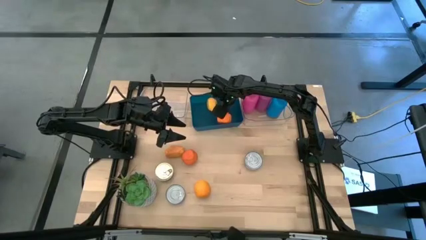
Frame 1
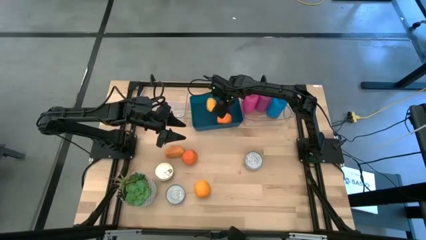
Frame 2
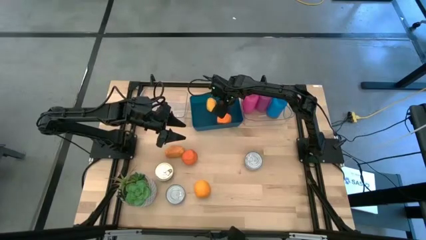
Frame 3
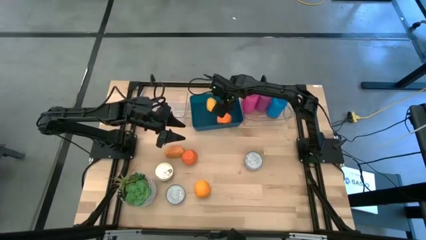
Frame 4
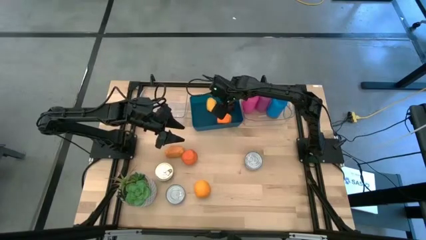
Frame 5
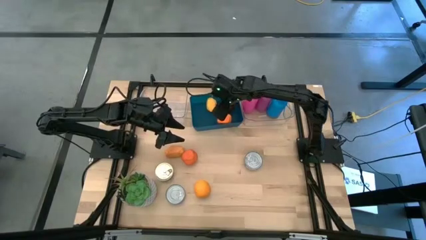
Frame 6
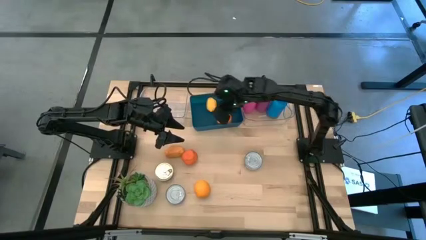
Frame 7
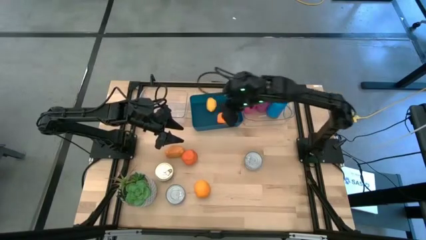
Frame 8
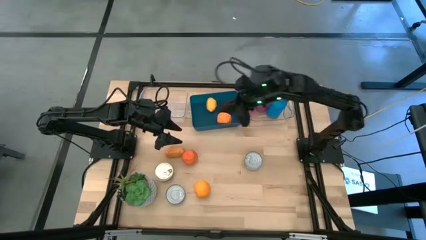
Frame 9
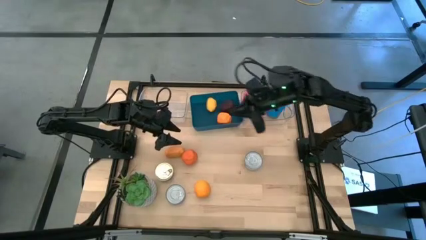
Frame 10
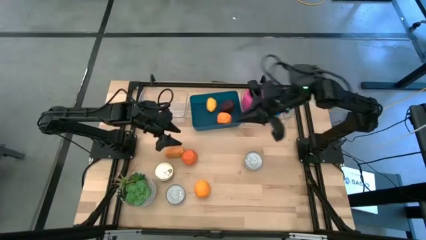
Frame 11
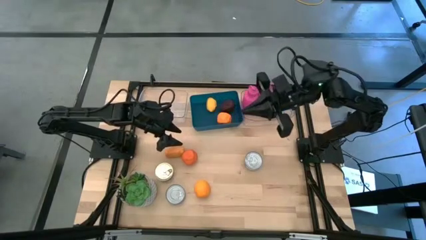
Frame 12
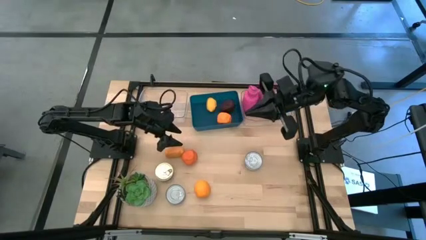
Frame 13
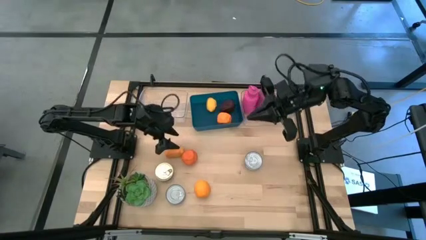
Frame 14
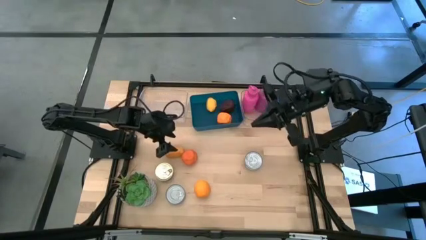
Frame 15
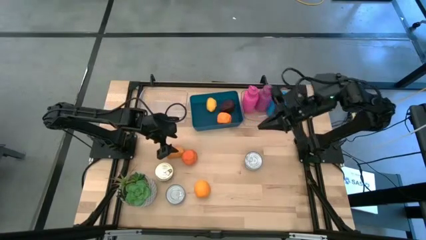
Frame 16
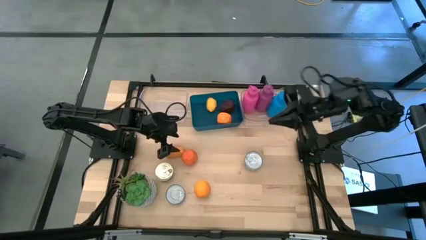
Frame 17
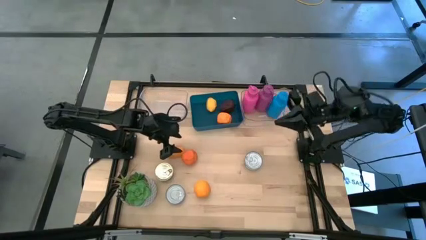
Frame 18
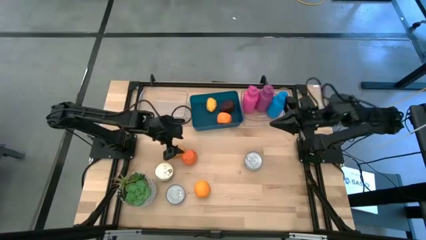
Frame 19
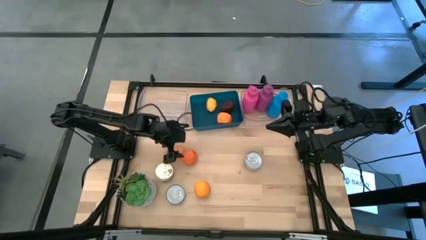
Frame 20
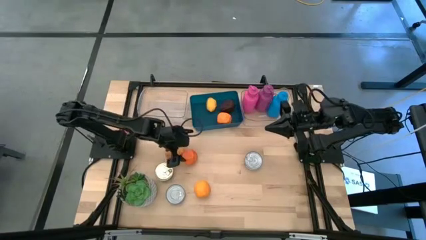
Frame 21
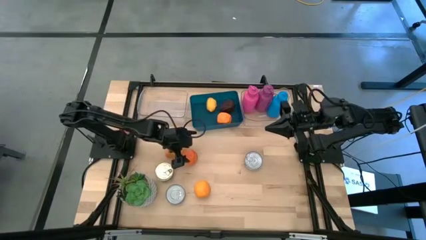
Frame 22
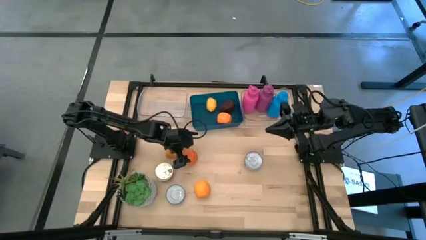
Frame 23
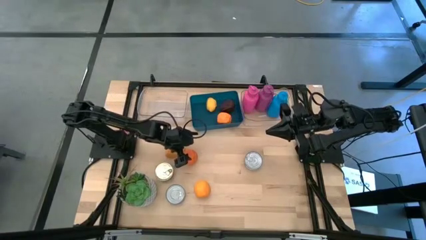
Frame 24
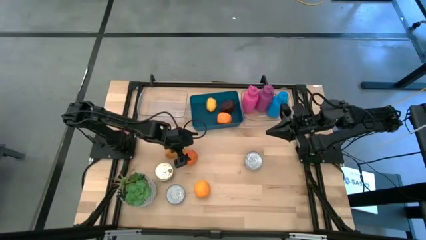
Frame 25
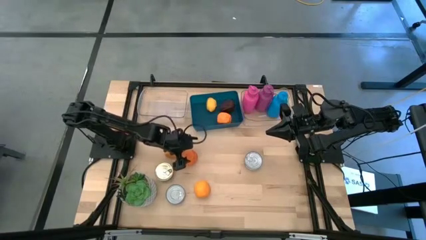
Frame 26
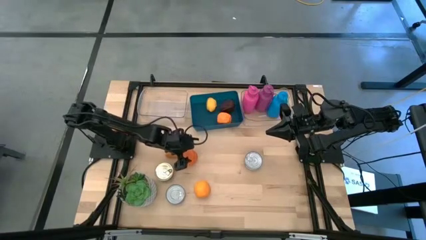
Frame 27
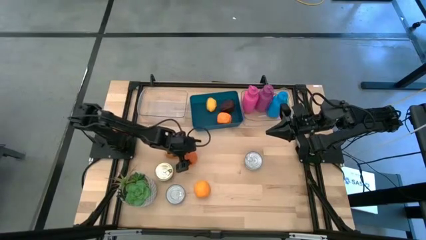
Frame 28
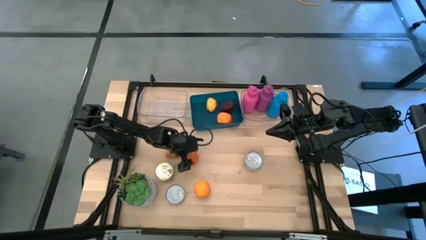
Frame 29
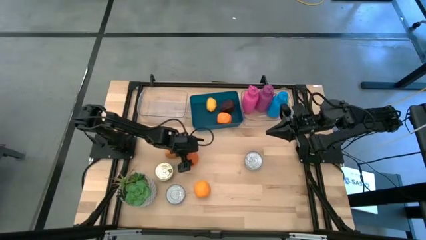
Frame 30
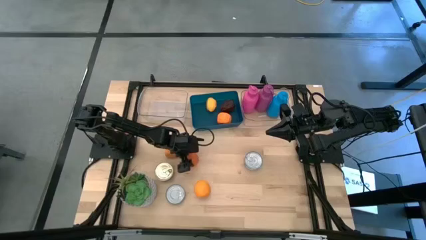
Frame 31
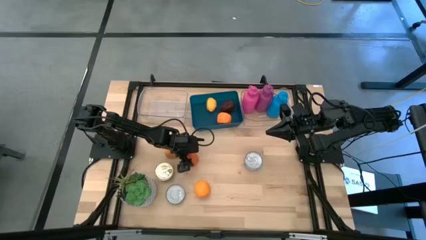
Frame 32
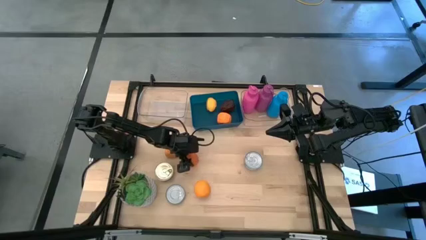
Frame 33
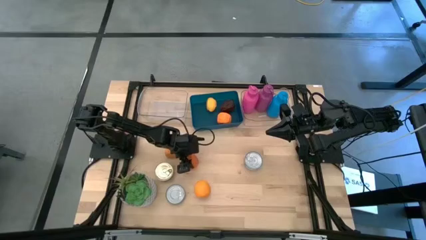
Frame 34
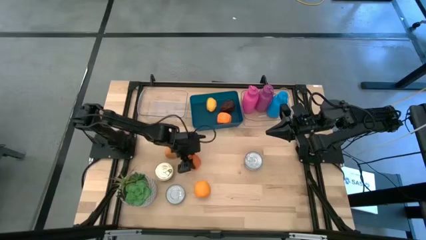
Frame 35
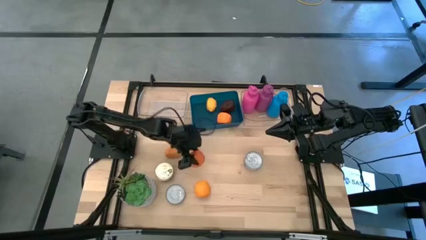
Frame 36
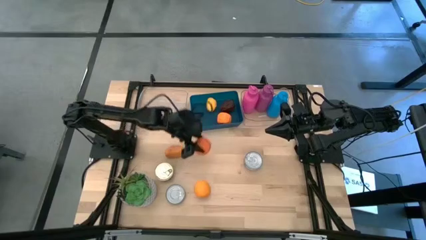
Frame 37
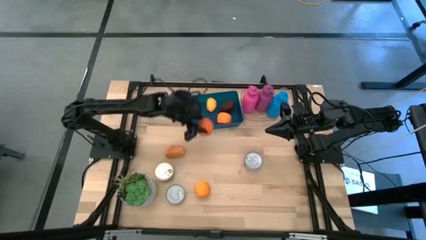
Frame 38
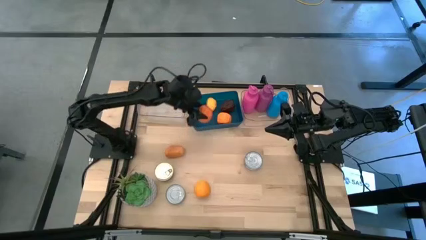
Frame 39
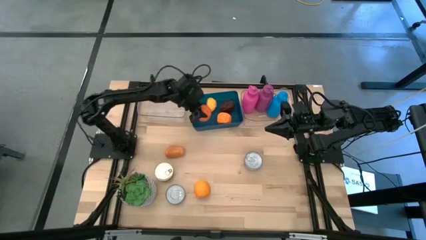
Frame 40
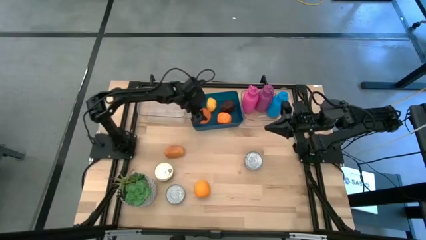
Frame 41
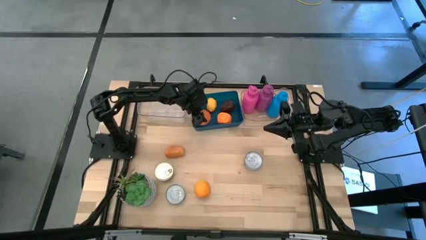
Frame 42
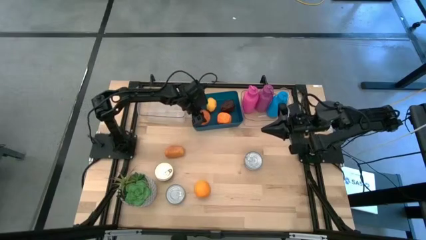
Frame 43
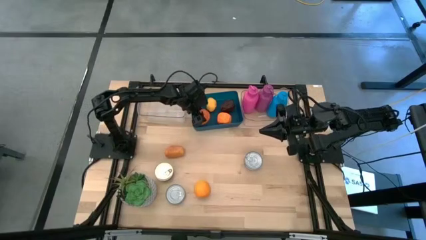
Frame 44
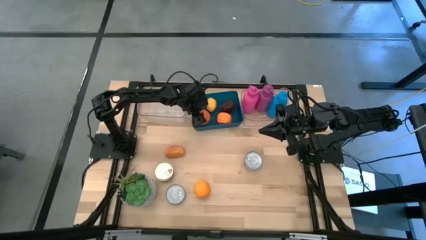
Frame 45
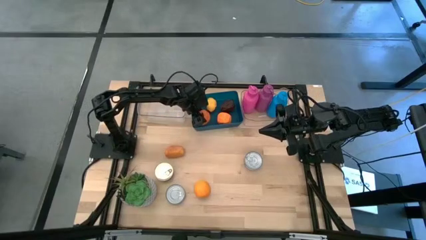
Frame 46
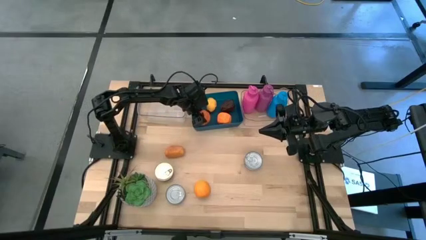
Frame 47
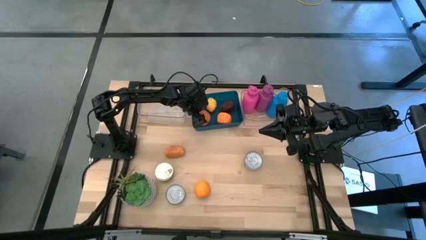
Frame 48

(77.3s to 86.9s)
Task: Pick & Place Food Item
Put the orange into the blue bin

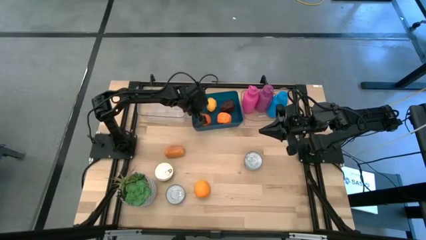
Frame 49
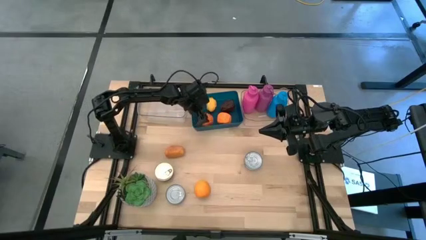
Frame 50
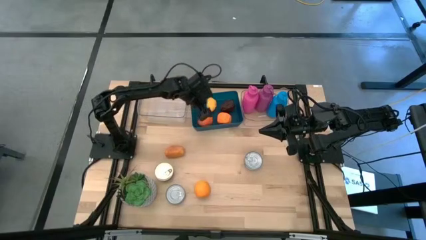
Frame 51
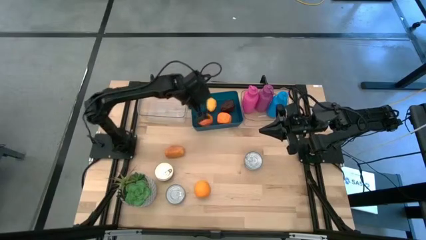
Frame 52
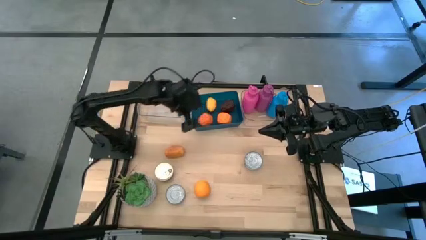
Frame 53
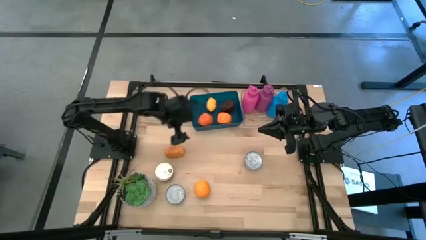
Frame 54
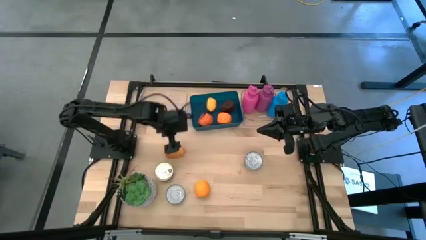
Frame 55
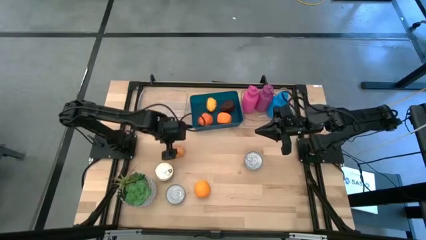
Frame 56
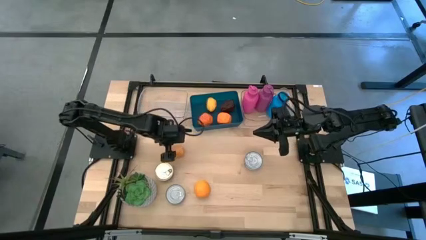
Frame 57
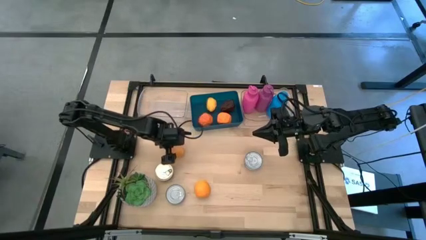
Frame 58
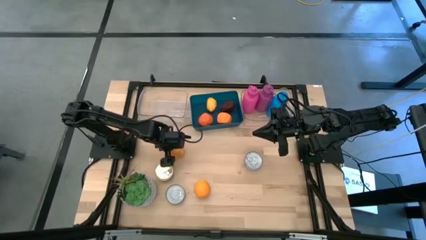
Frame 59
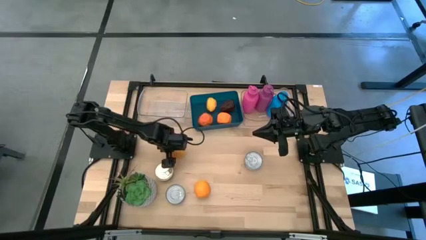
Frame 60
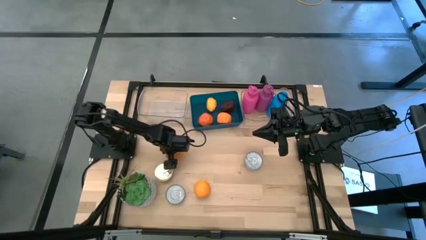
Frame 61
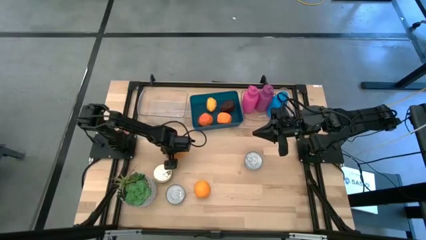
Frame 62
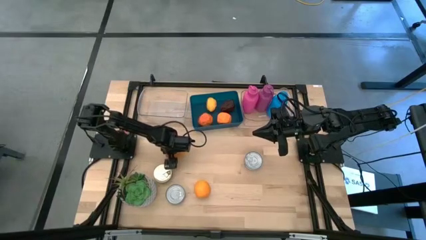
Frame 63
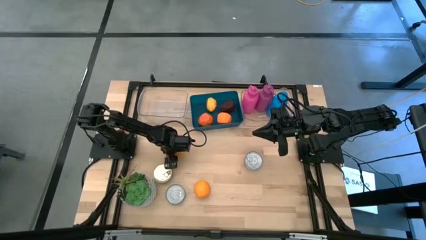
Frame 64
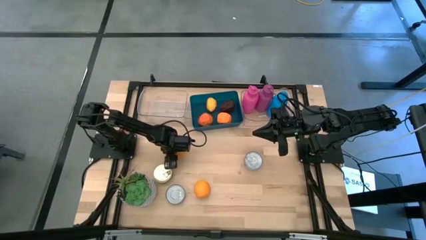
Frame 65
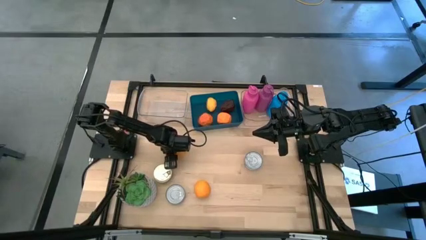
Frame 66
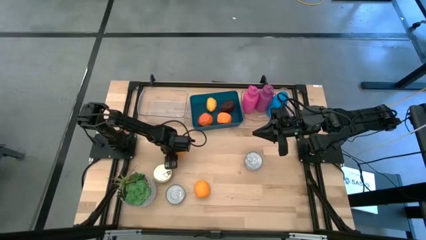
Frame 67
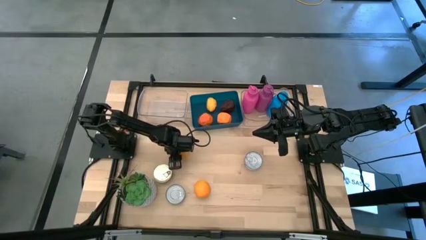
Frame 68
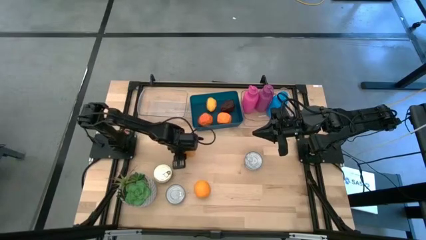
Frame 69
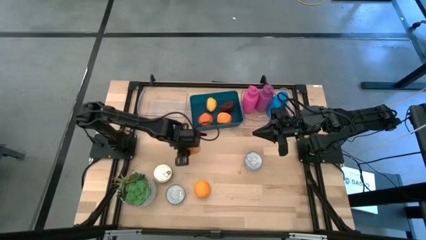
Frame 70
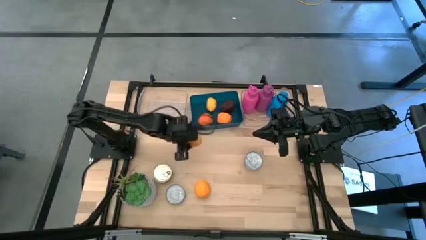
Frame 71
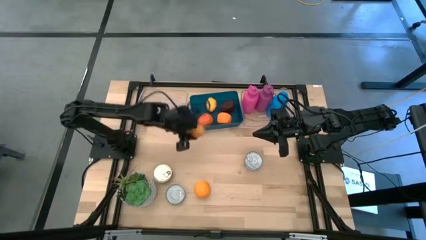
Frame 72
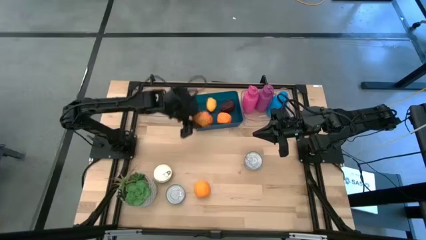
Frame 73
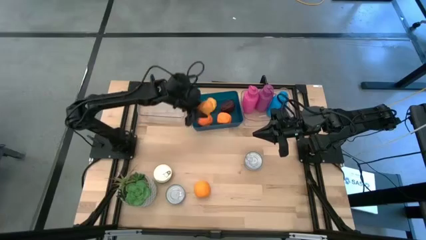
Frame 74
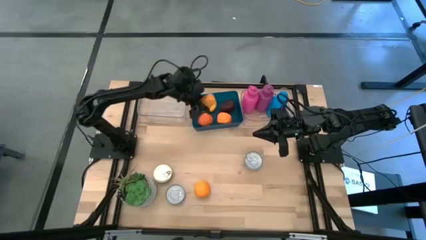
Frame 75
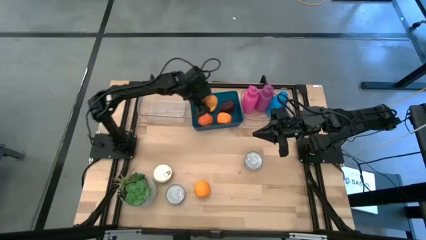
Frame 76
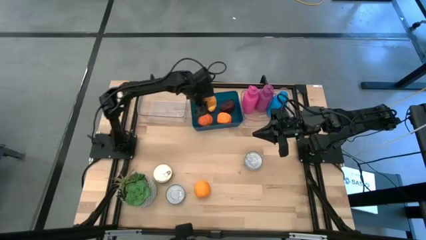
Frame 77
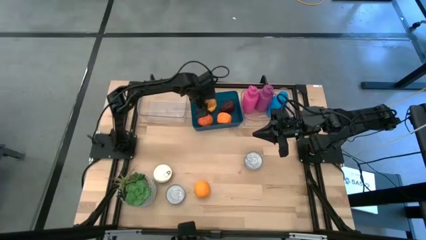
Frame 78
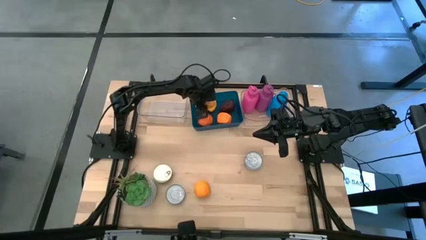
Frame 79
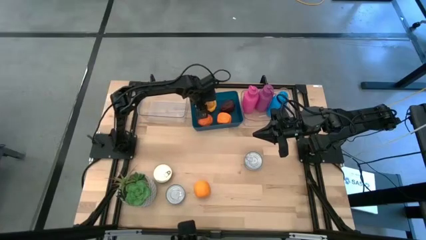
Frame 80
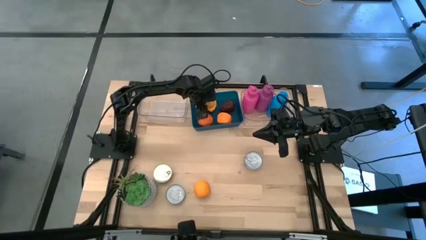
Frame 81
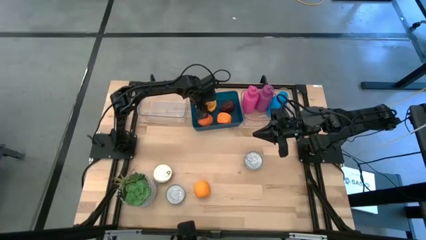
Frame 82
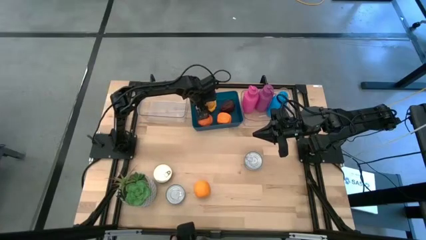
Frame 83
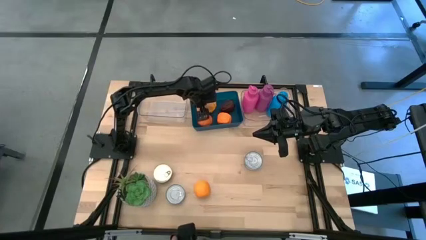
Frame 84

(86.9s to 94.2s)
Put the mango into the blue bin
